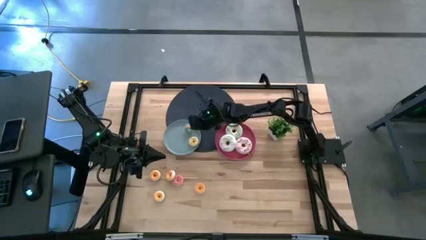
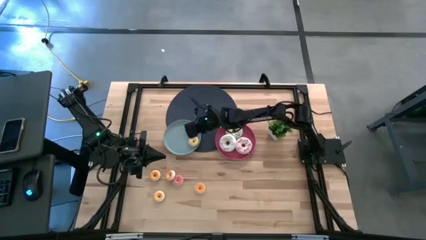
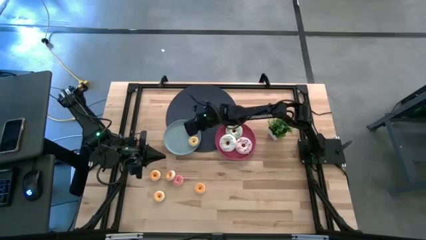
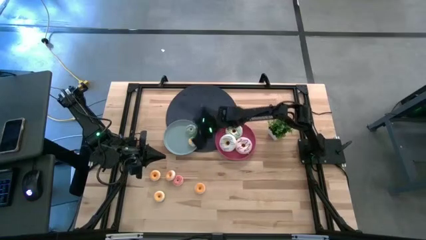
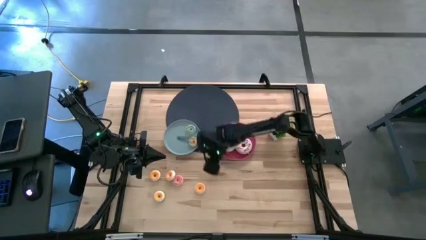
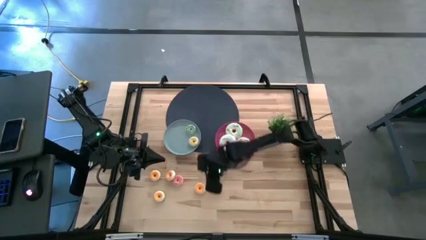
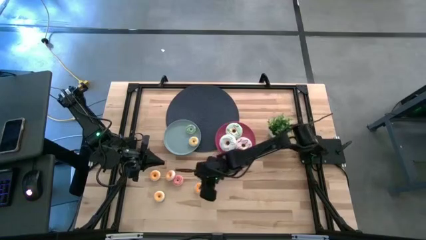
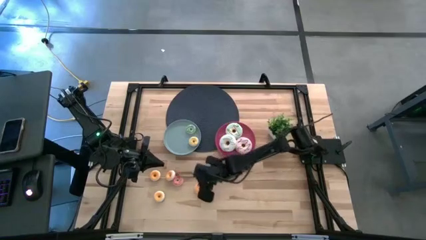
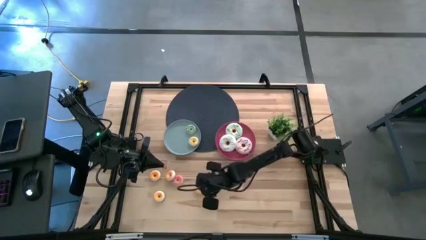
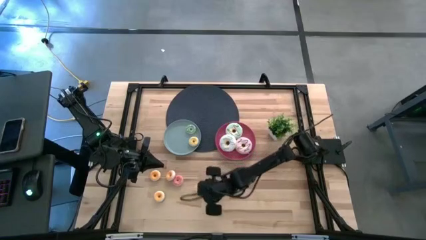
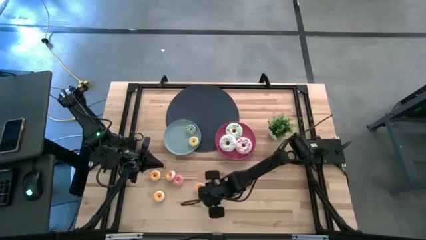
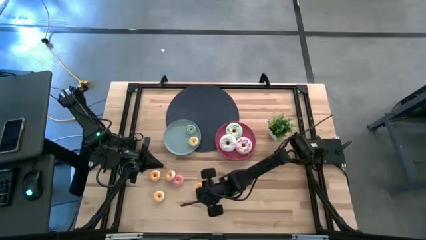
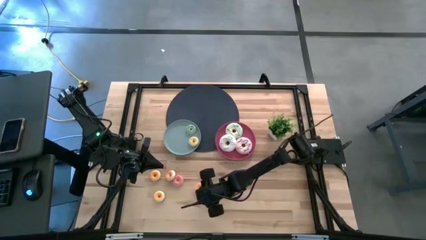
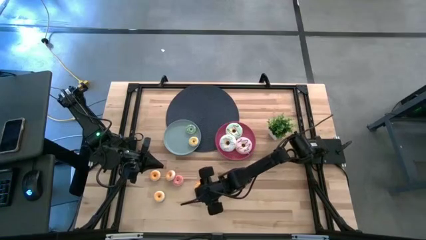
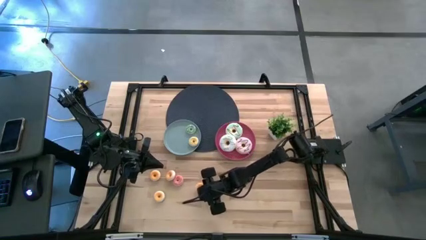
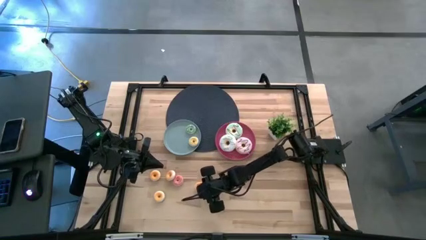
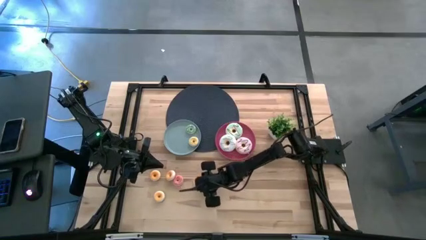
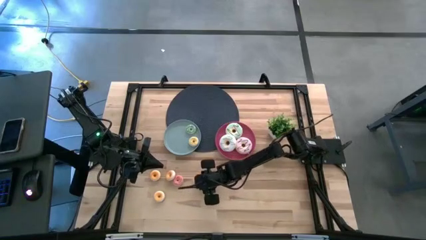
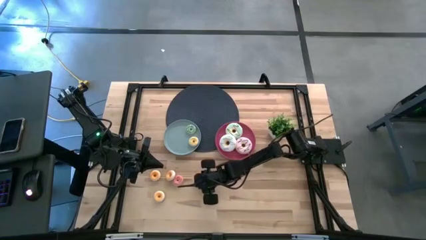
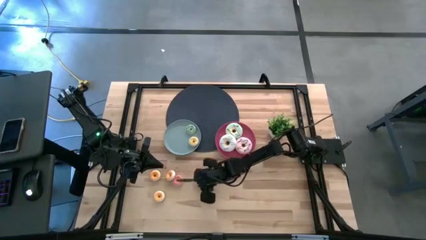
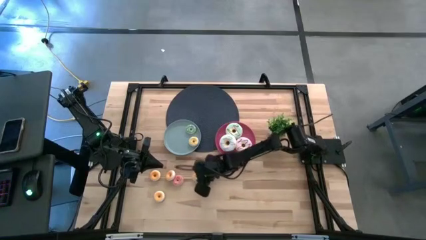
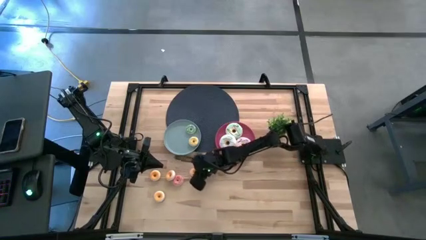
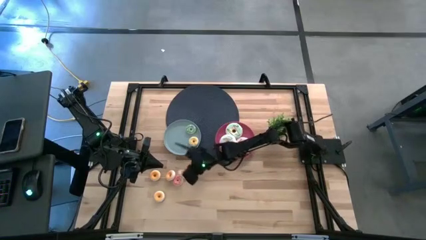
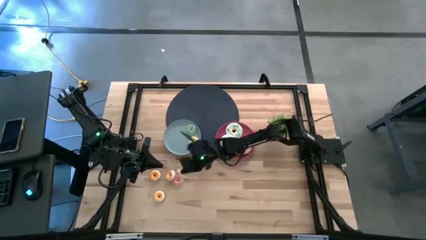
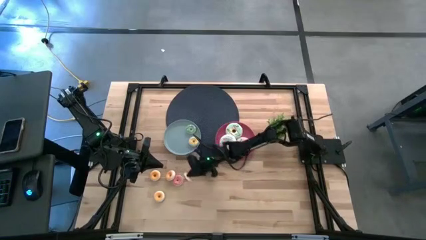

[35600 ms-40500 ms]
Task: Pick & Place donuts
Put the small brown doughnut on the blue plate

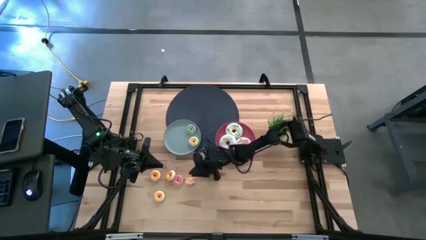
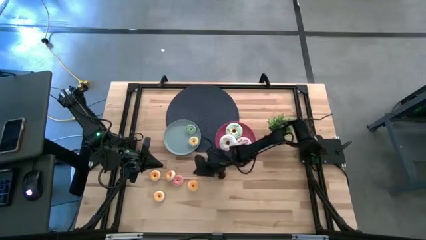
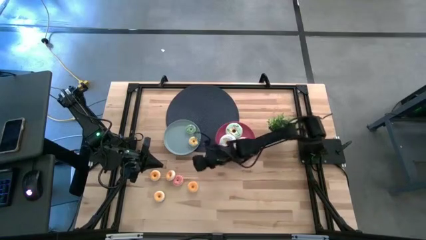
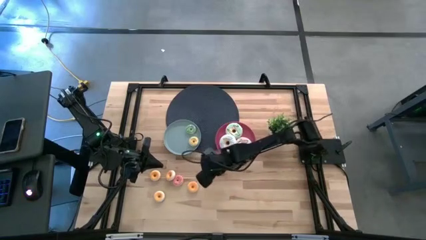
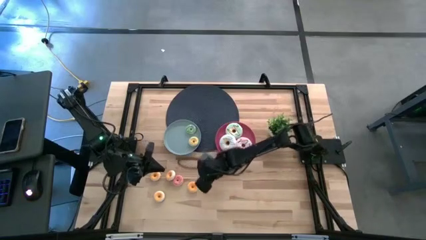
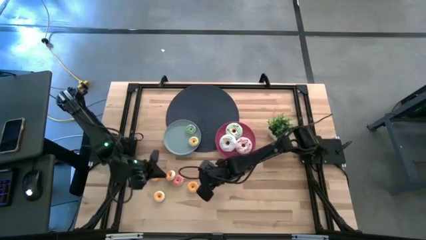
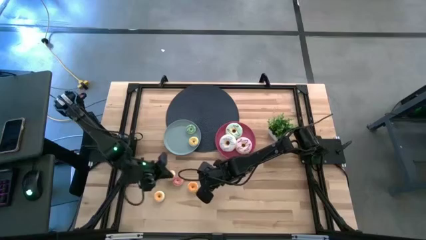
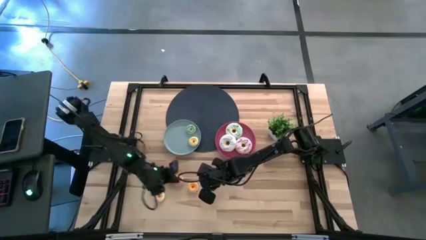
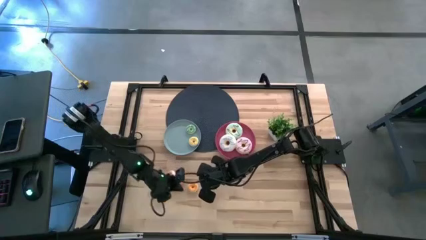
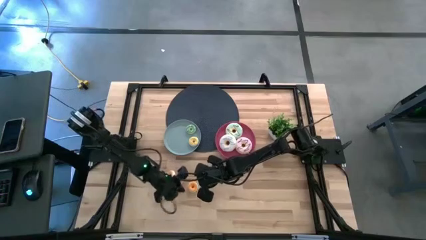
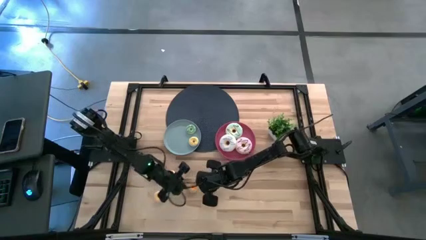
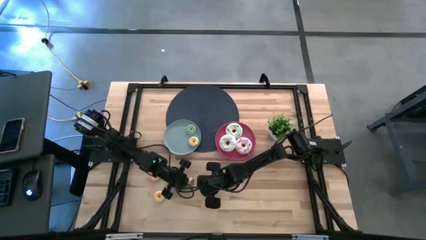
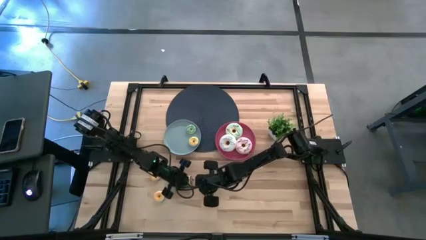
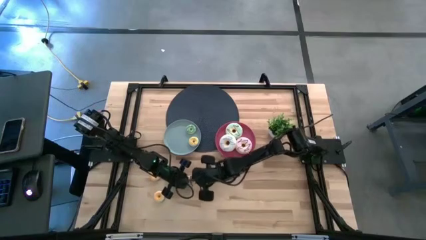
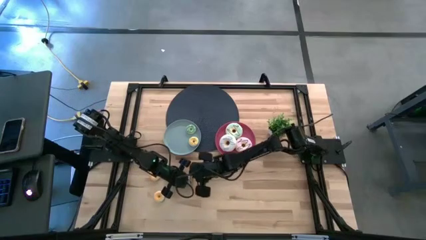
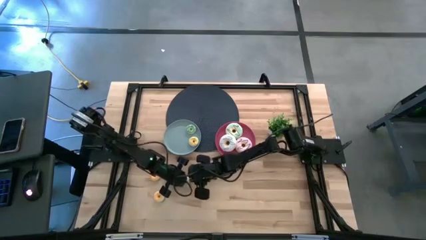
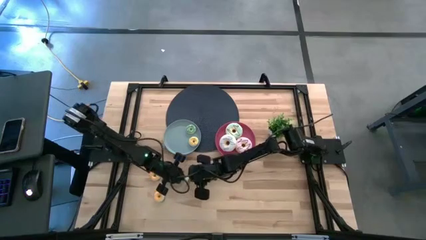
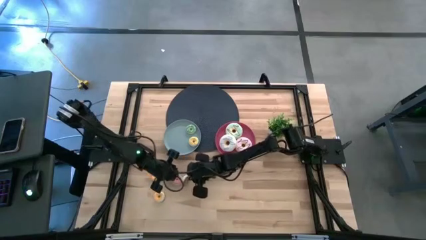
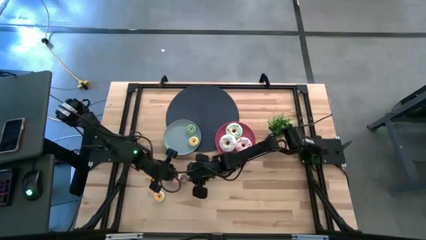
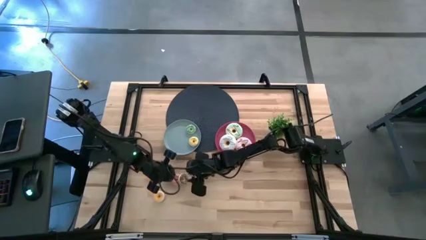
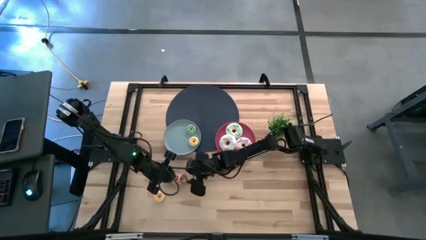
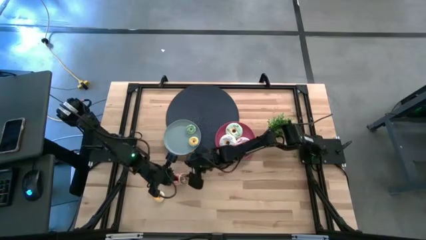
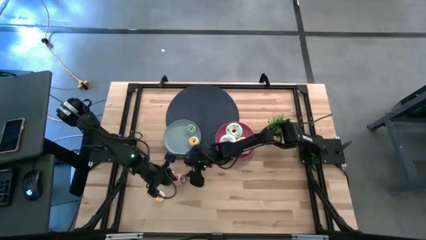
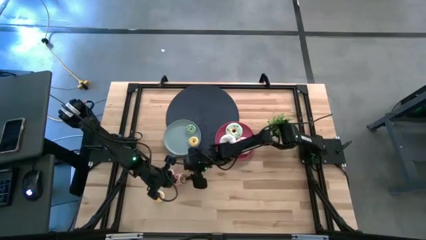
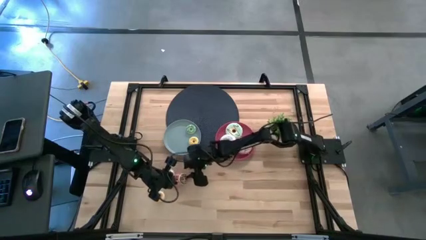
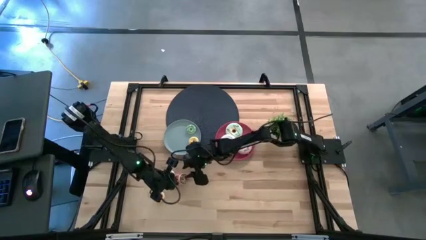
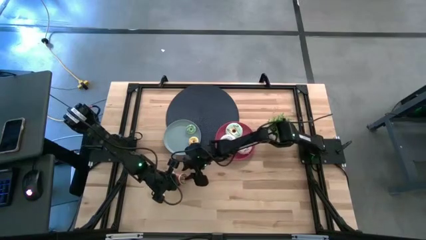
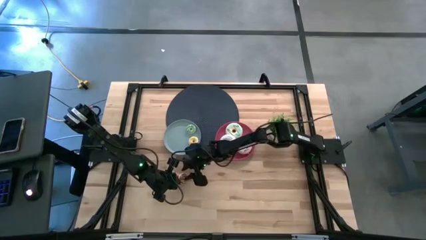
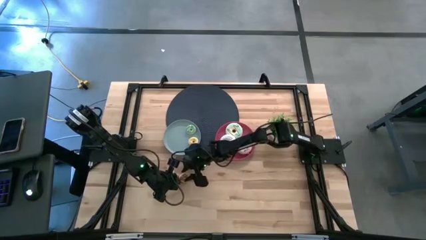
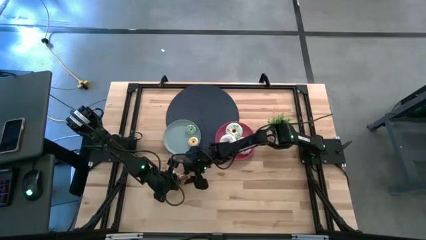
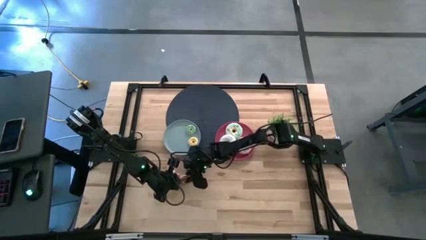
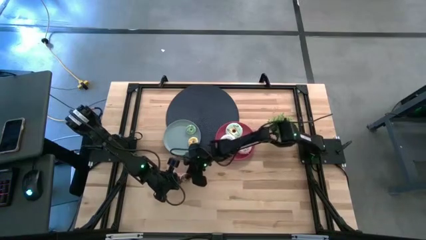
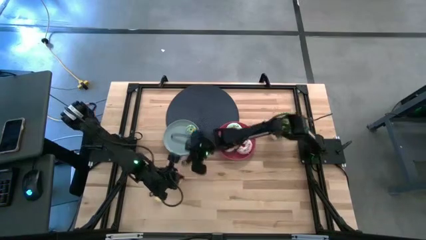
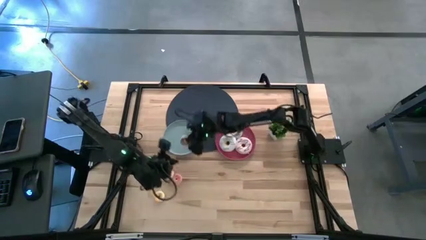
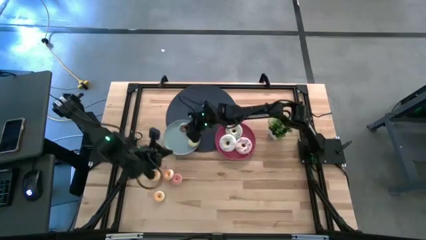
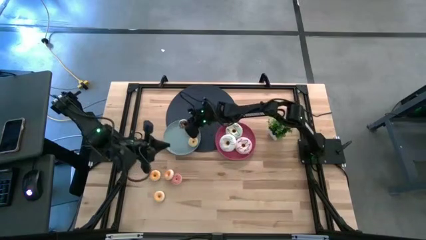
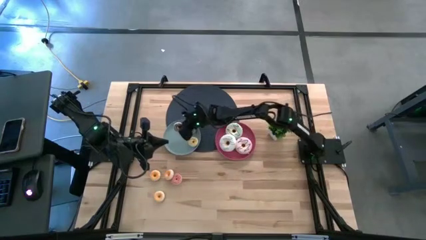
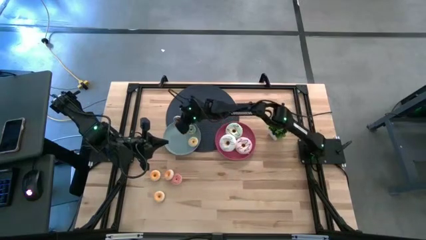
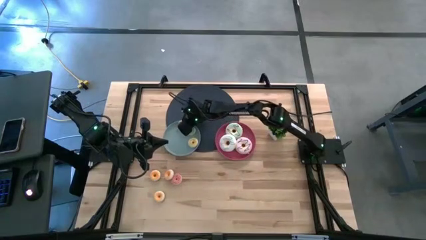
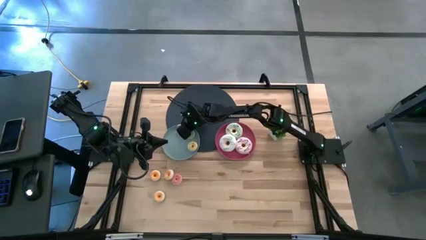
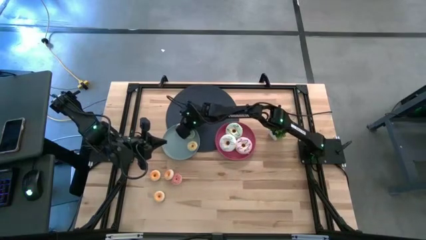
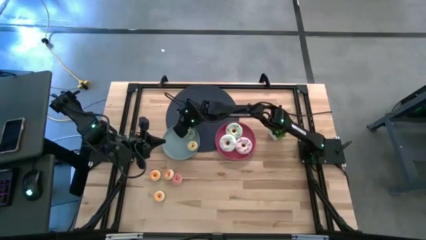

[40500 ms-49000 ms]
Put the small brown doughnut on the blue plate

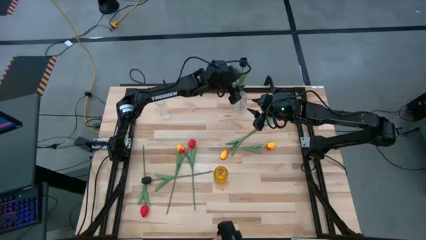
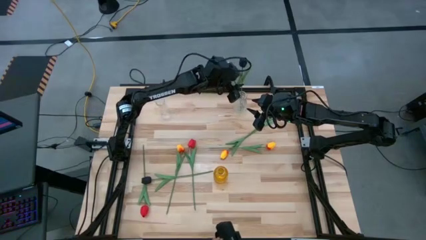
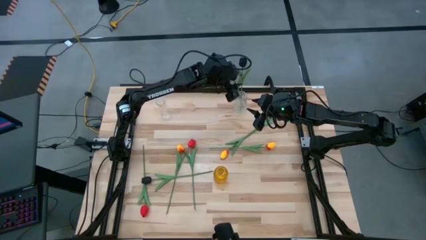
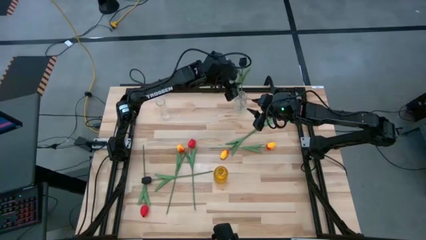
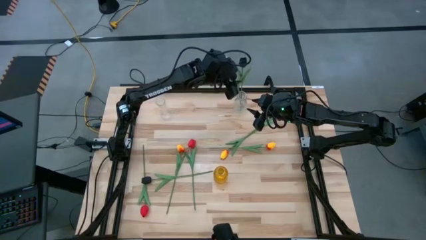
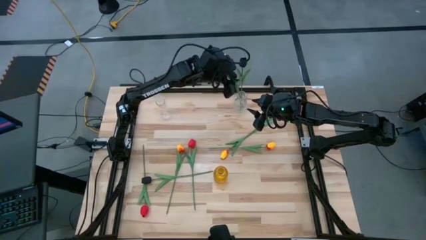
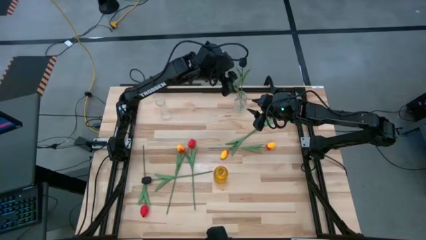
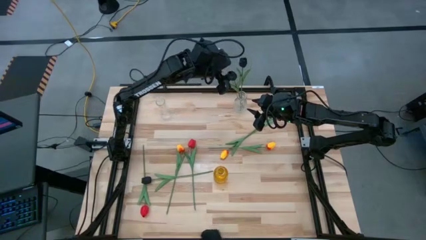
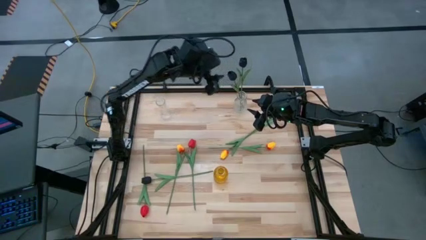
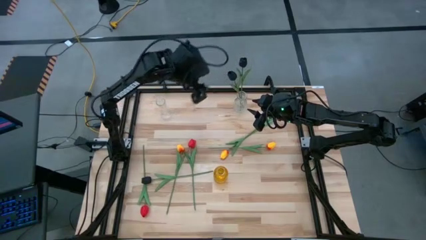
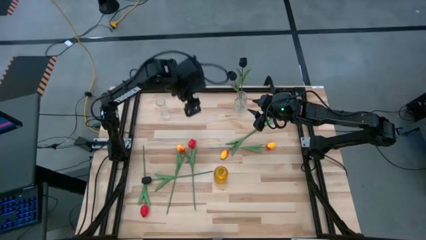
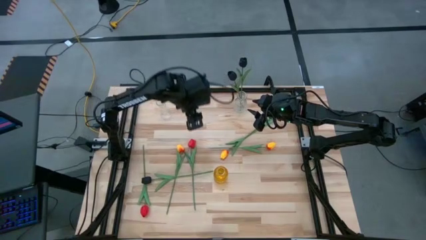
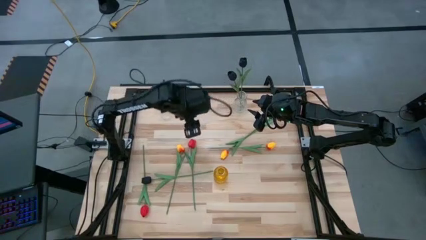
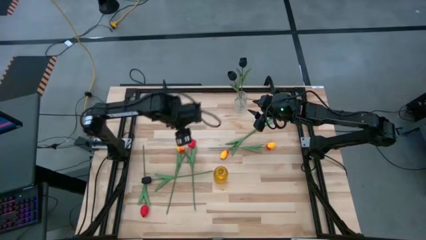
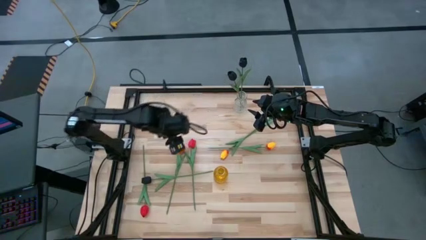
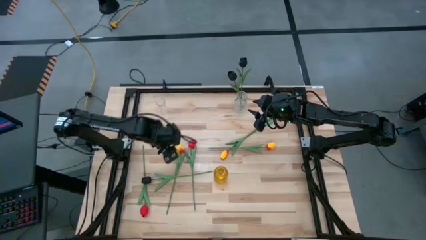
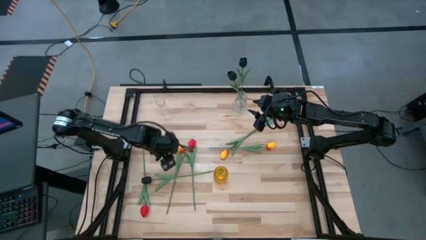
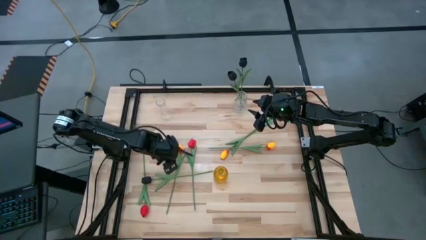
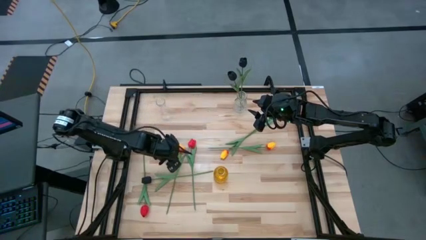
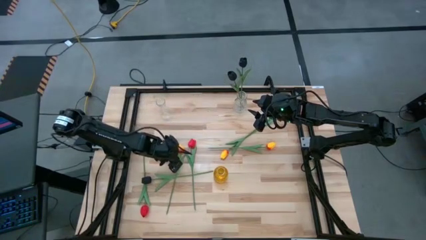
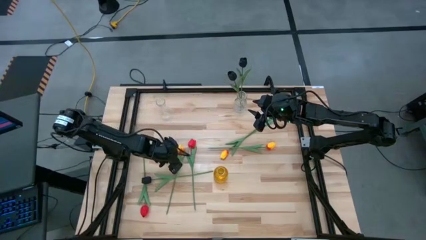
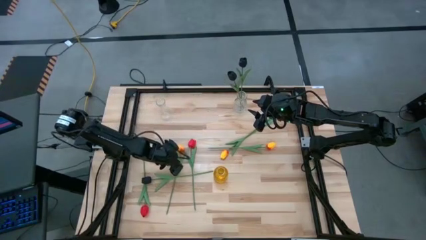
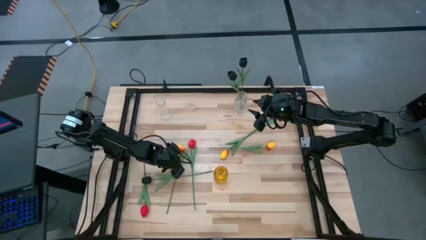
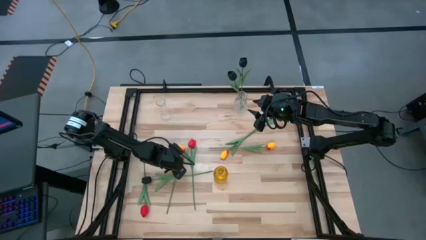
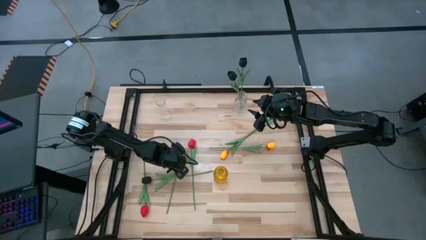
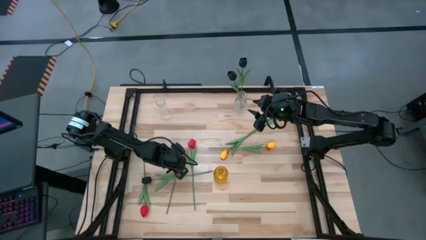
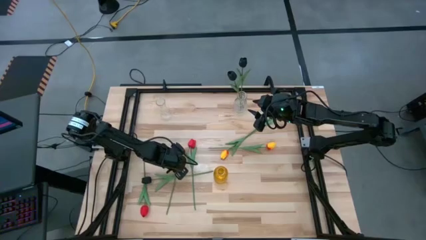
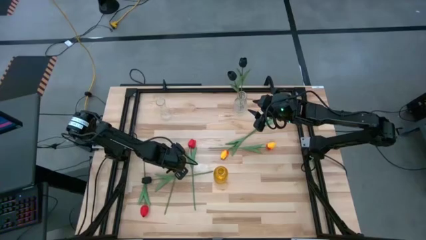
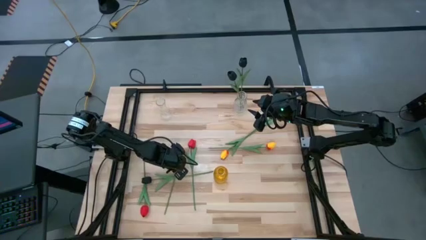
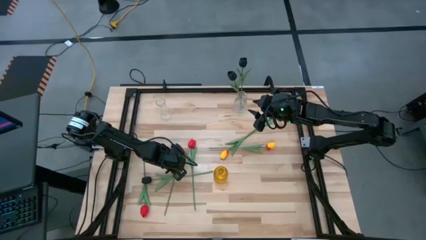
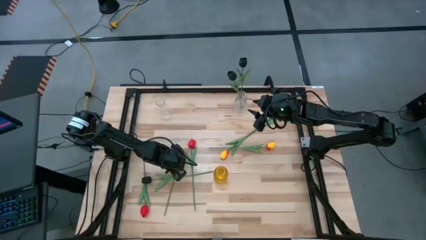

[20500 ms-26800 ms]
Task: Sort flowers into vase by color
Put the left yellow flower into the left transparent vase
